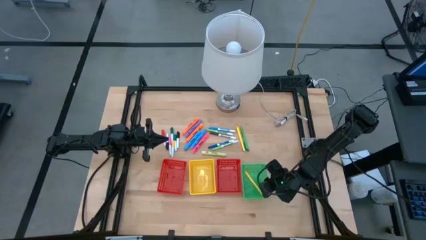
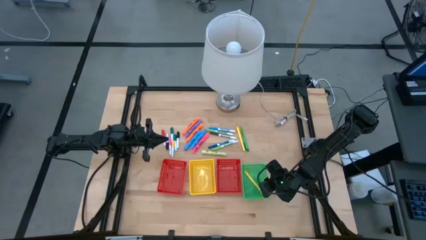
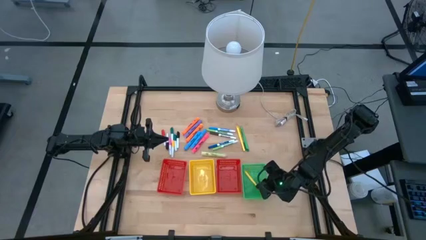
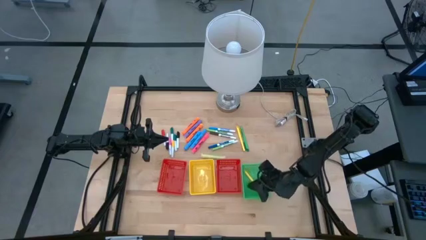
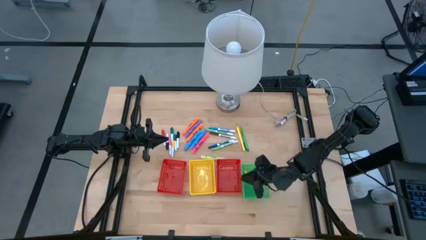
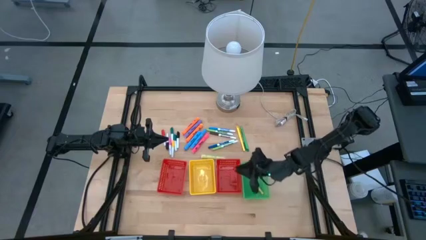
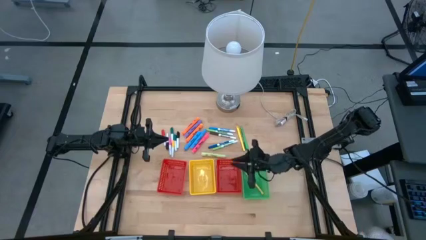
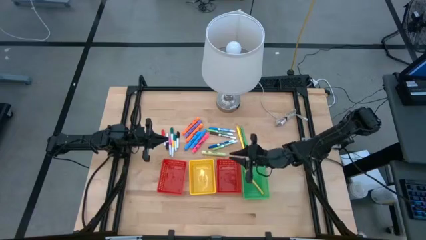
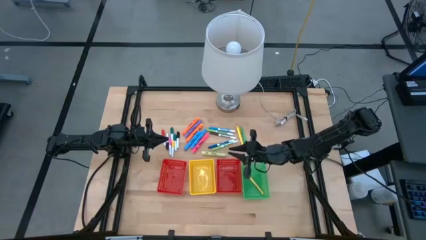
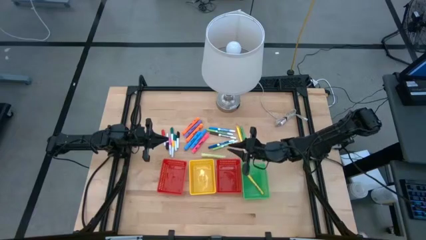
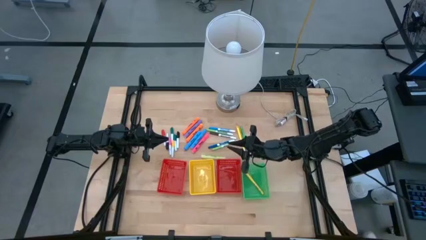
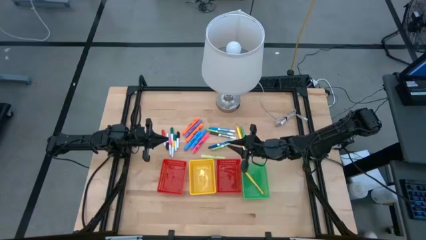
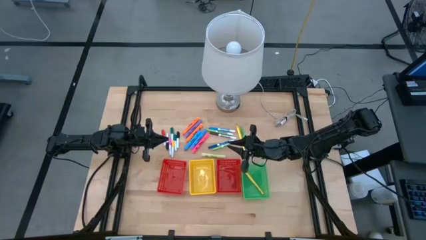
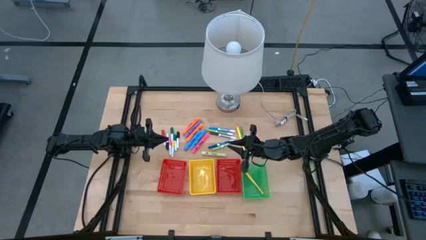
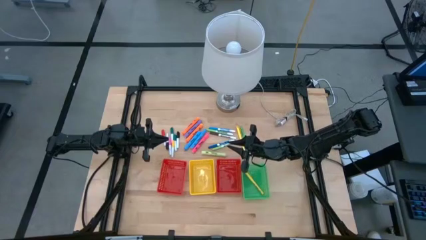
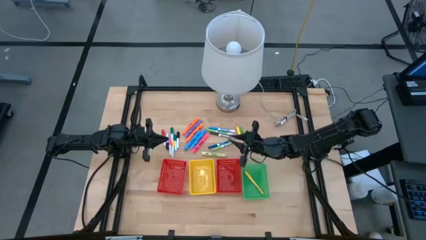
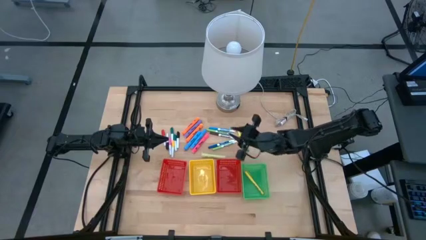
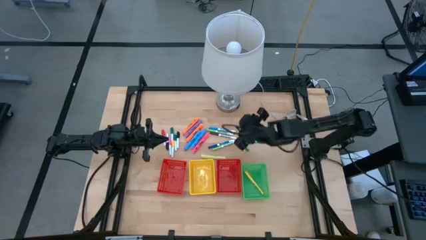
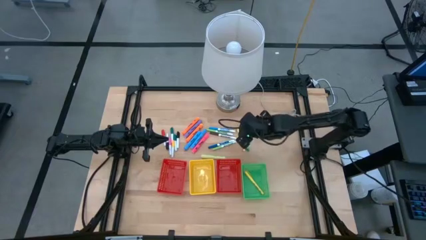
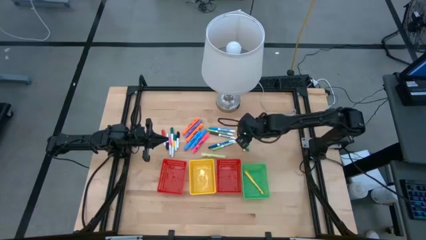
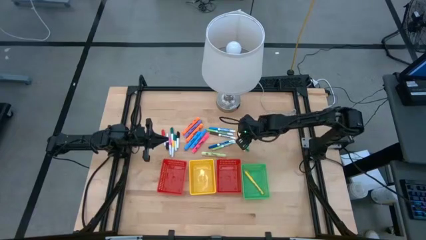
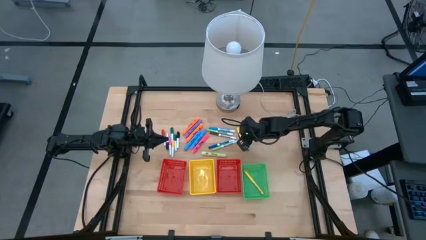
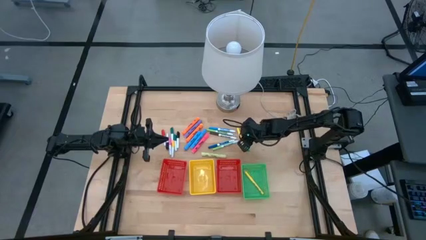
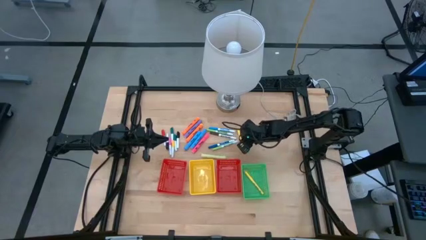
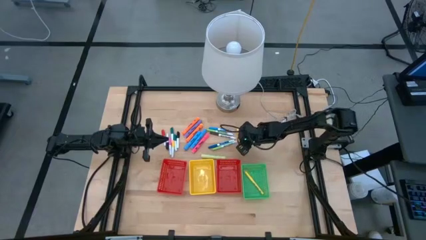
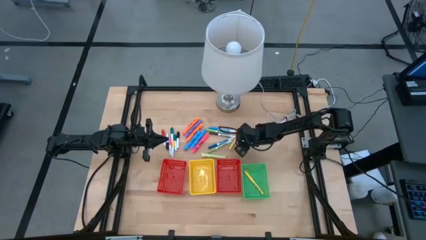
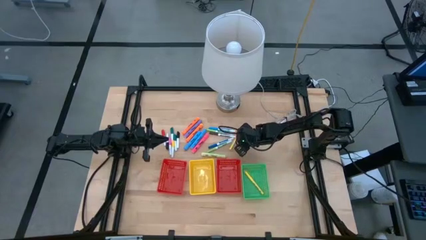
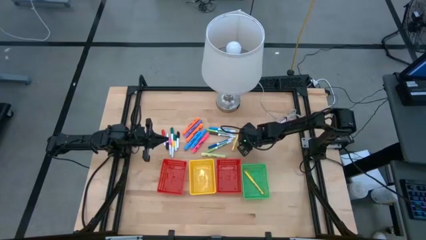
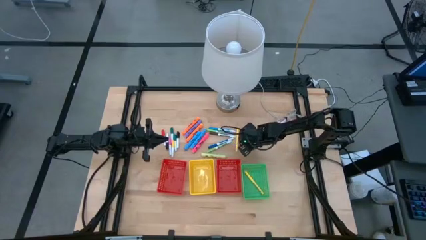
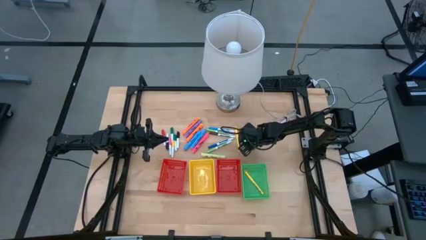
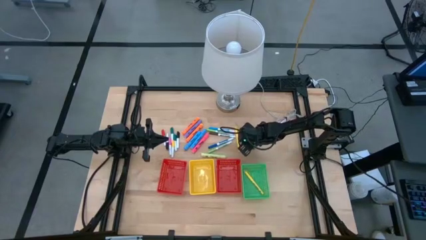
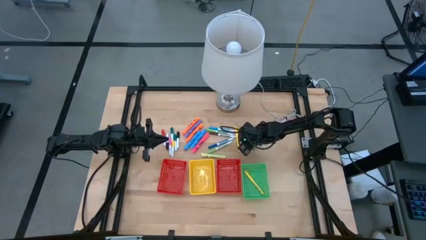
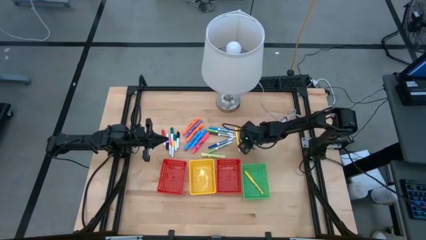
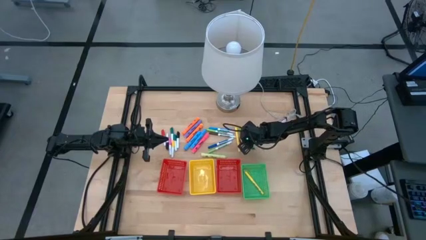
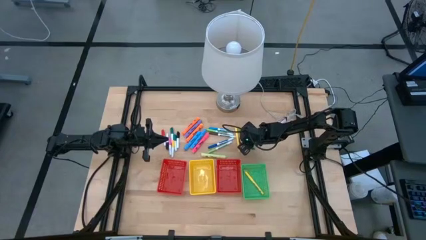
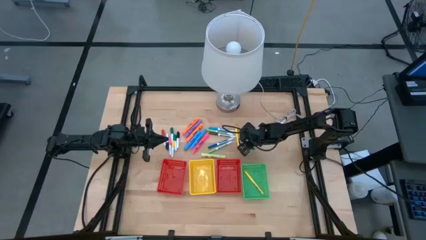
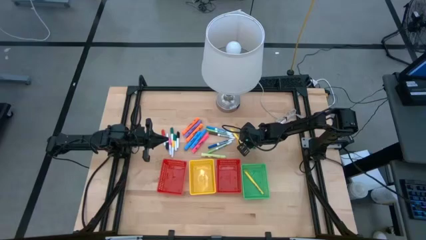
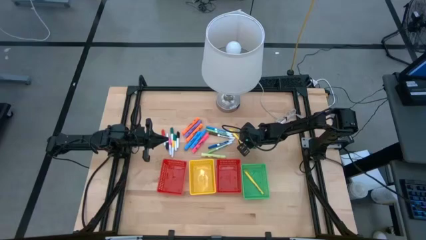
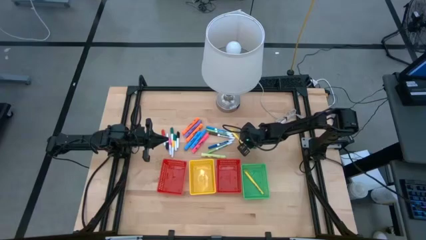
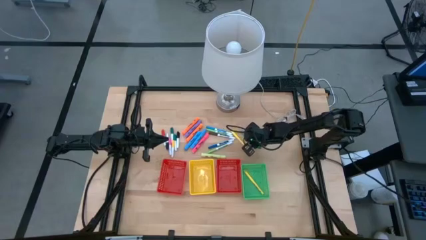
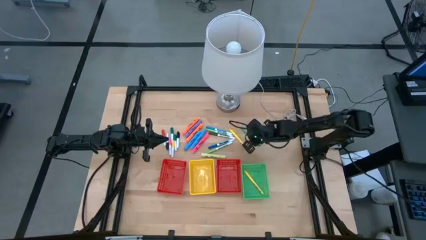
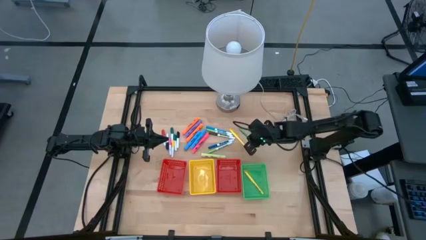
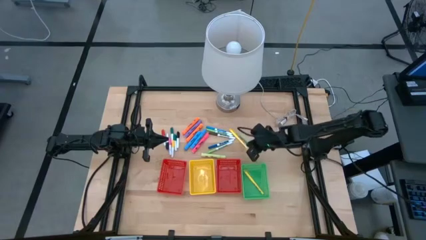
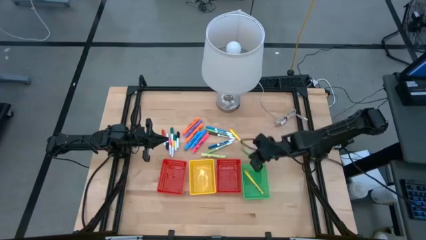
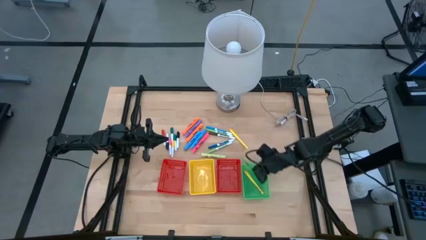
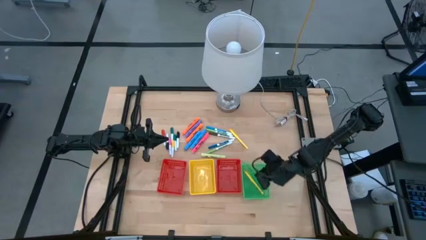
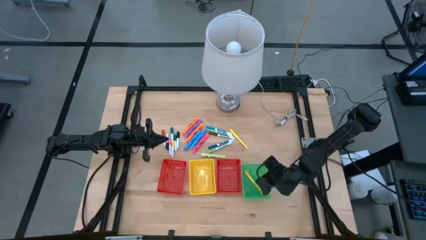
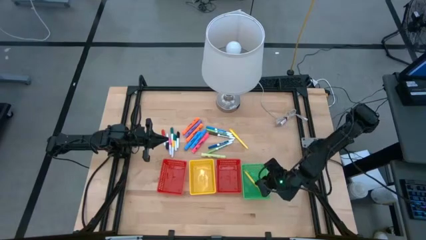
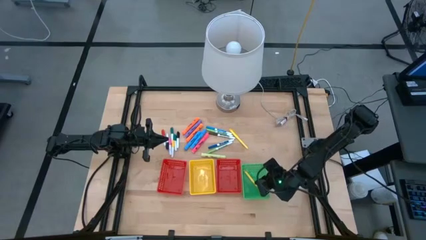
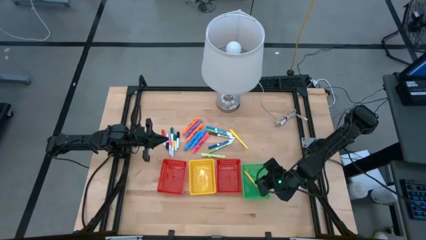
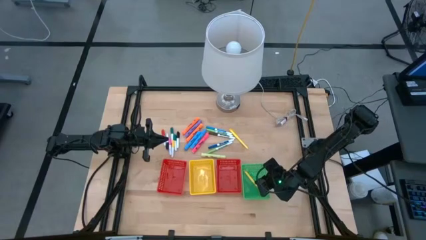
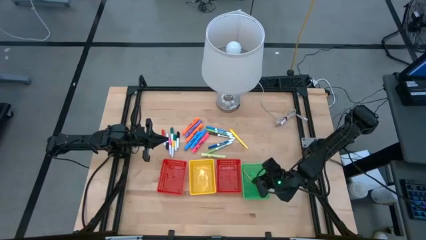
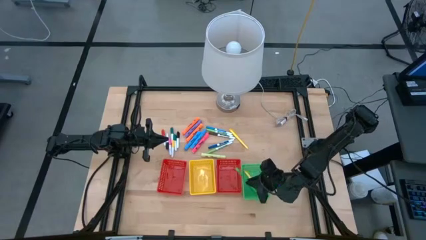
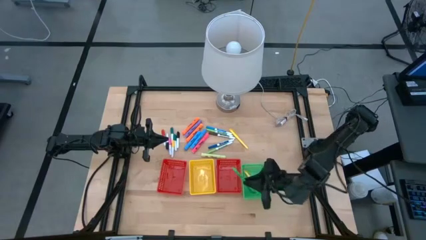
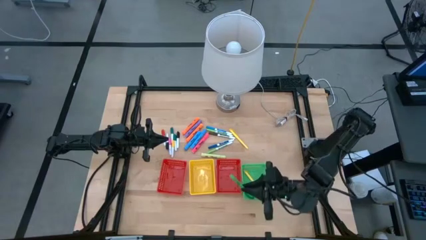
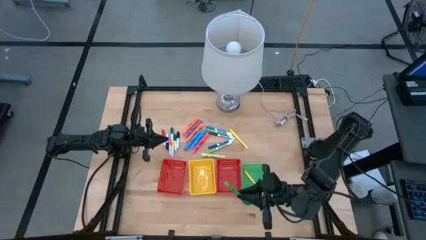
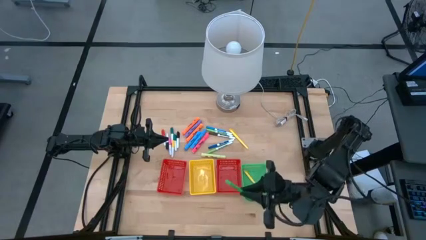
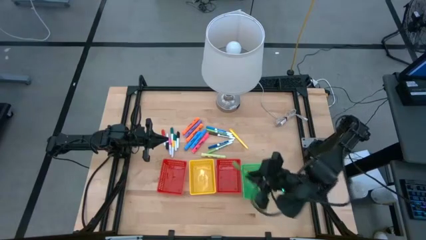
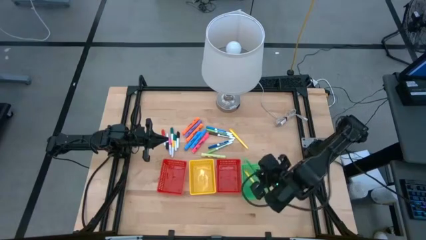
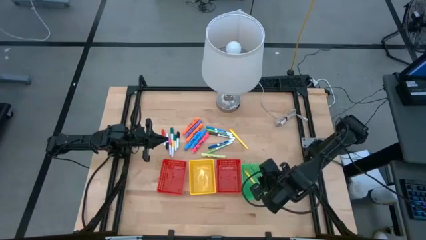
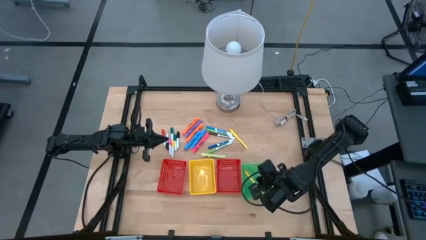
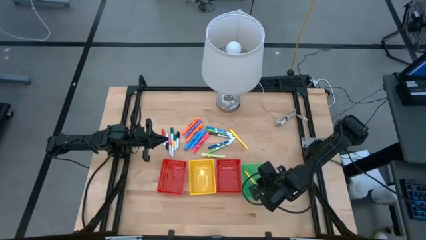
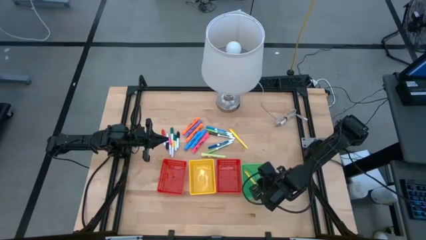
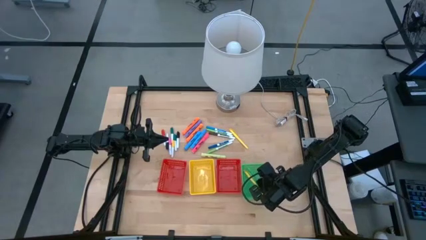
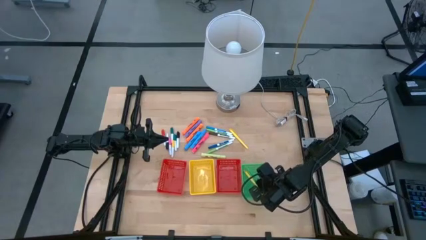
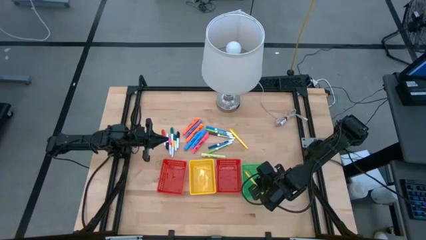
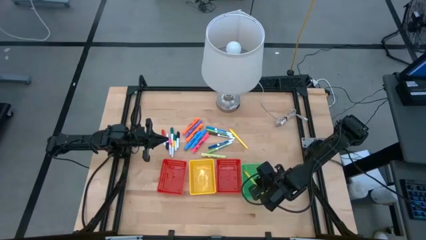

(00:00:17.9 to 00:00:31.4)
Task: Pick & Place Markers
Put the green pen into the green bin
